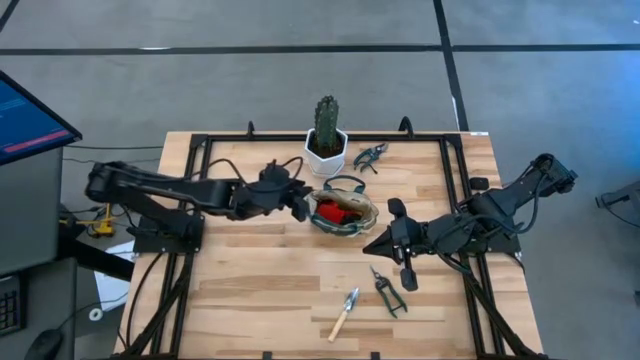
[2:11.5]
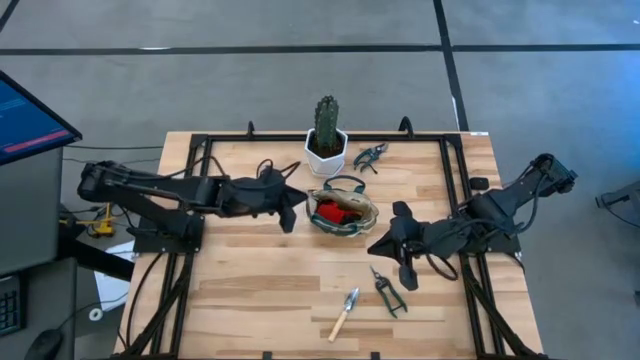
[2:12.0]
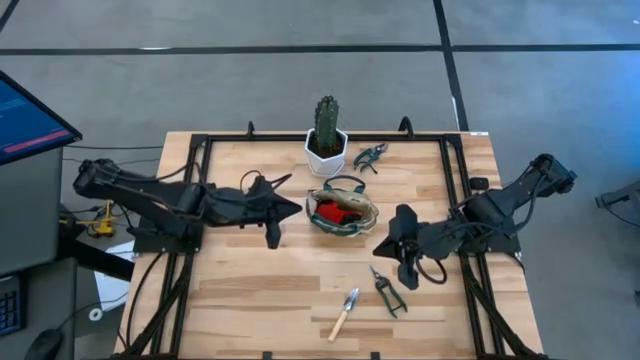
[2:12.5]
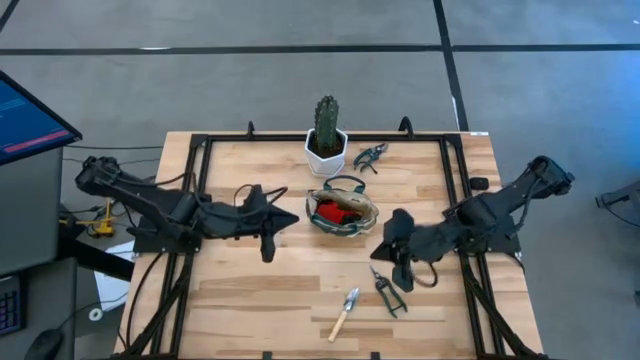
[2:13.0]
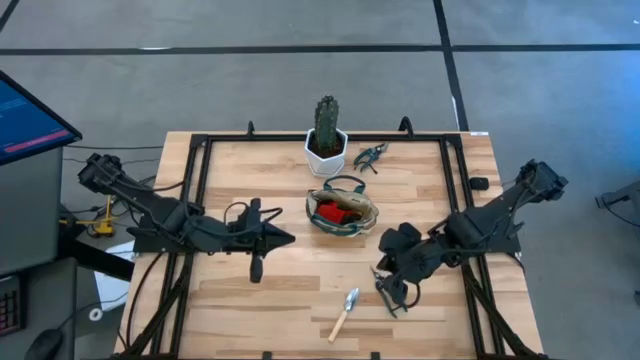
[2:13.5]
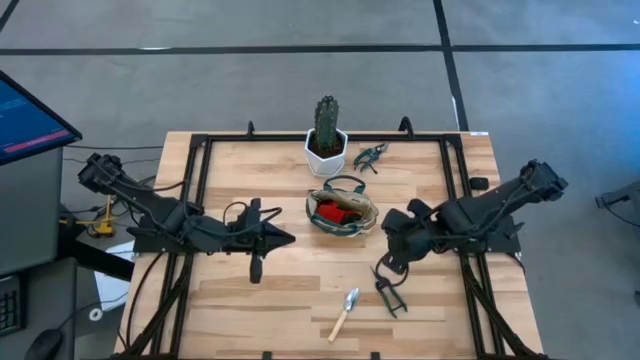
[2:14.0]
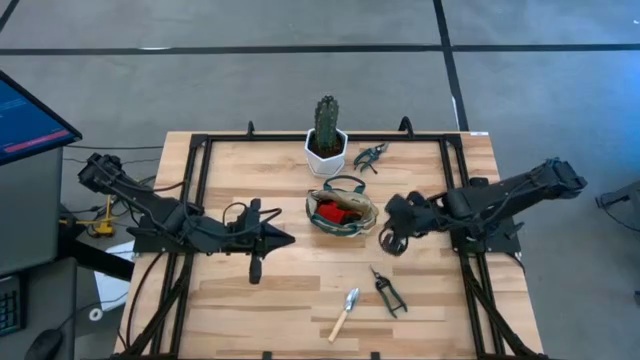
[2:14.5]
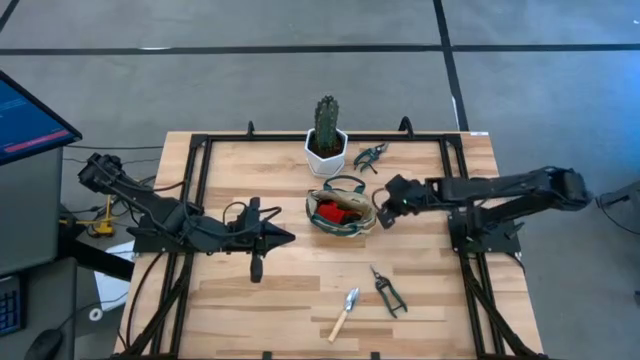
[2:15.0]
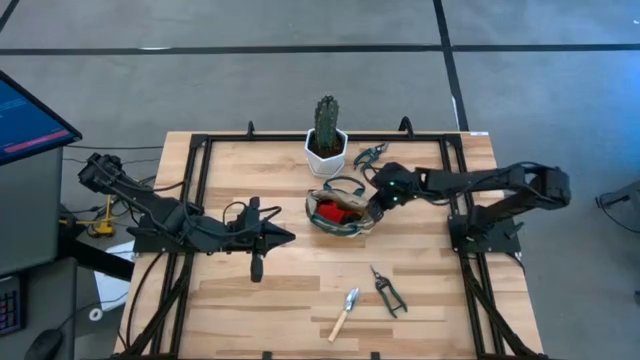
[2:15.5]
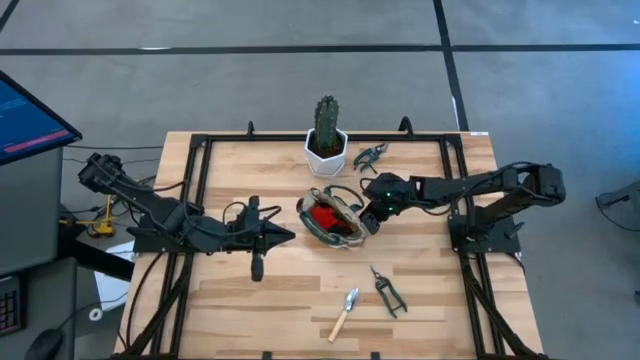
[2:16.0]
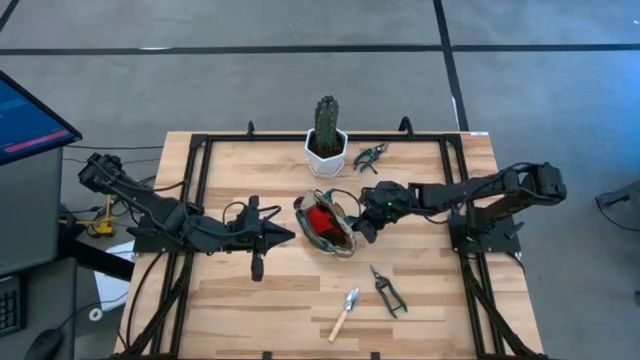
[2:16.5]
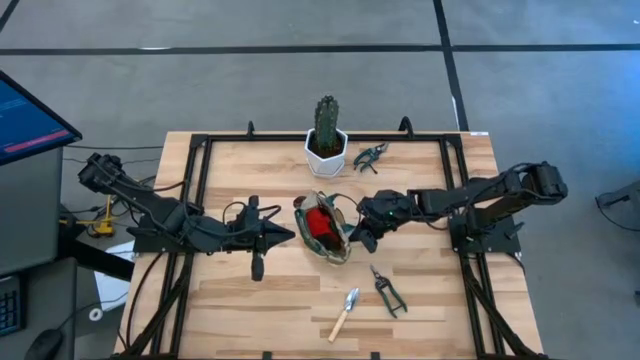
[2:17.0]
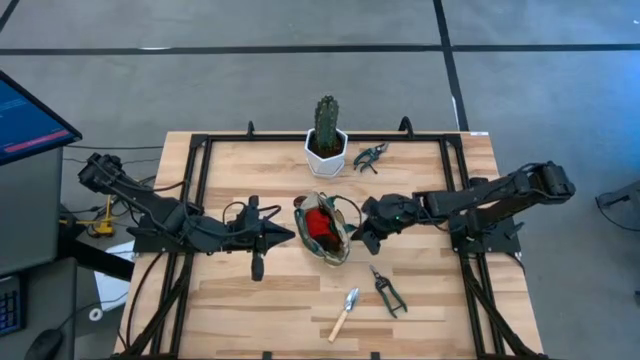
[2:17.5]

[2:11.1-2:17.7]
Task: Pick & Place Garden tools in Gardening bag
Adjust the gardening bag

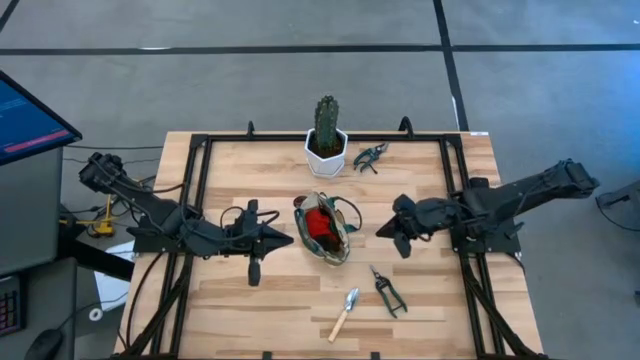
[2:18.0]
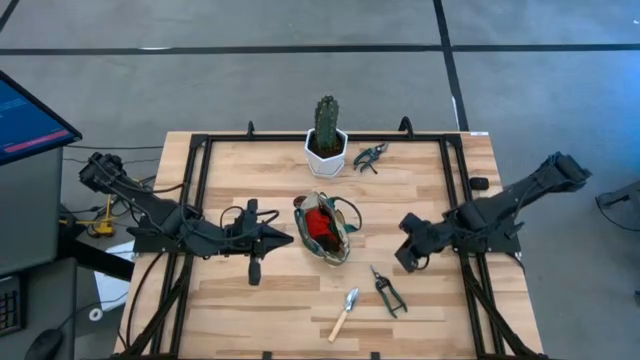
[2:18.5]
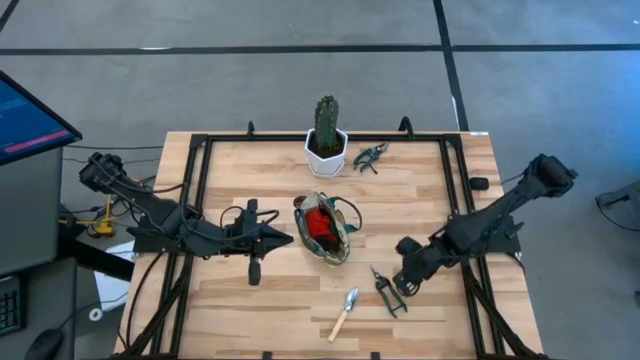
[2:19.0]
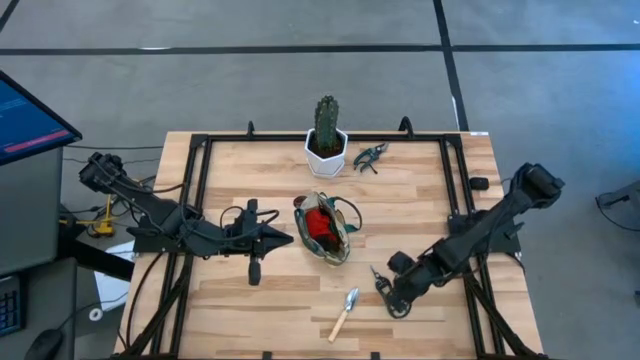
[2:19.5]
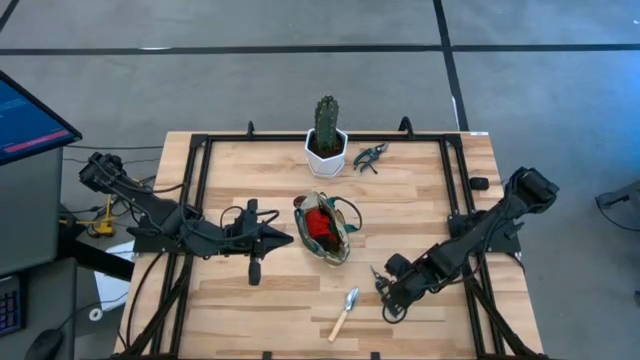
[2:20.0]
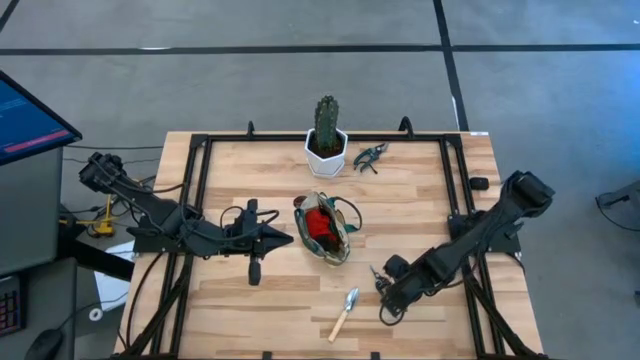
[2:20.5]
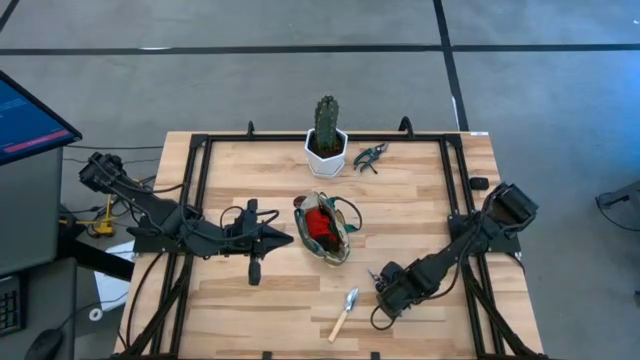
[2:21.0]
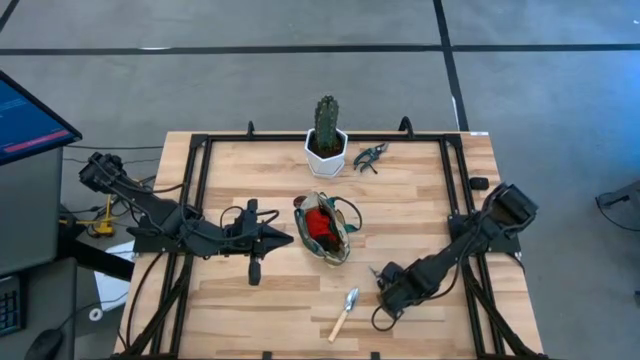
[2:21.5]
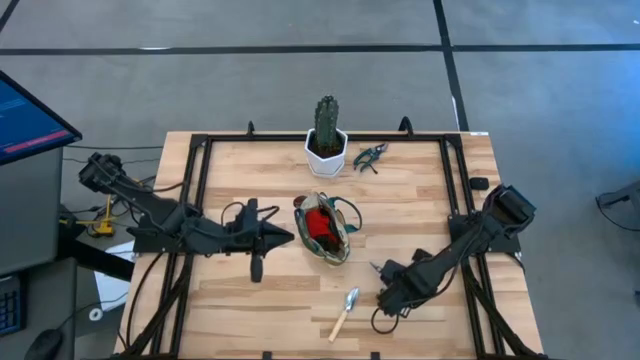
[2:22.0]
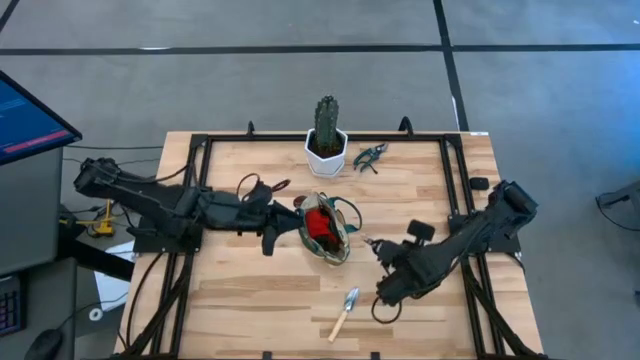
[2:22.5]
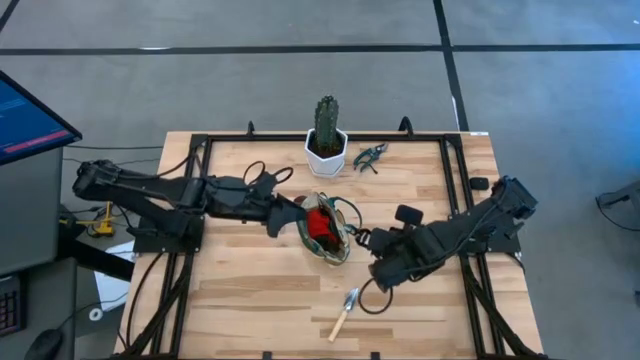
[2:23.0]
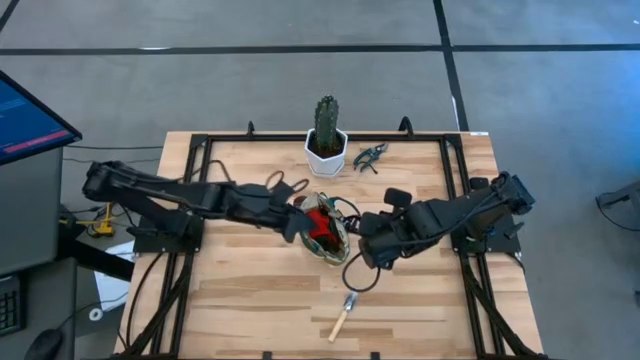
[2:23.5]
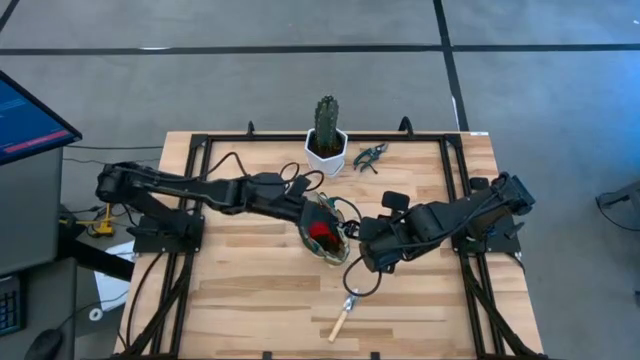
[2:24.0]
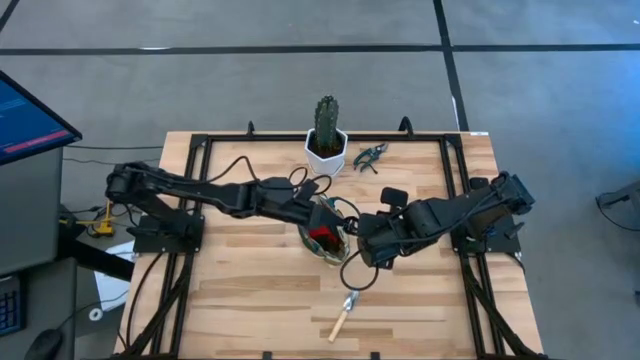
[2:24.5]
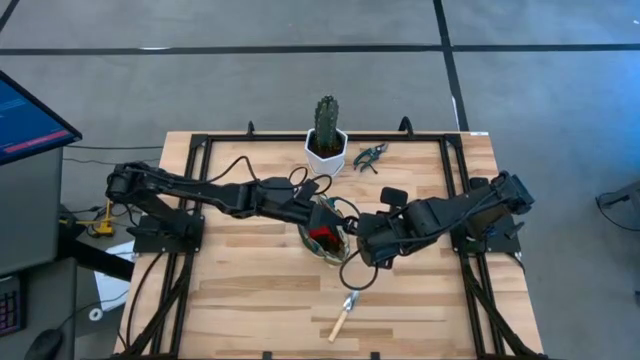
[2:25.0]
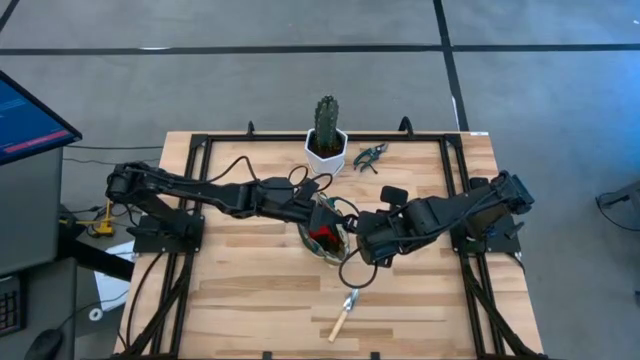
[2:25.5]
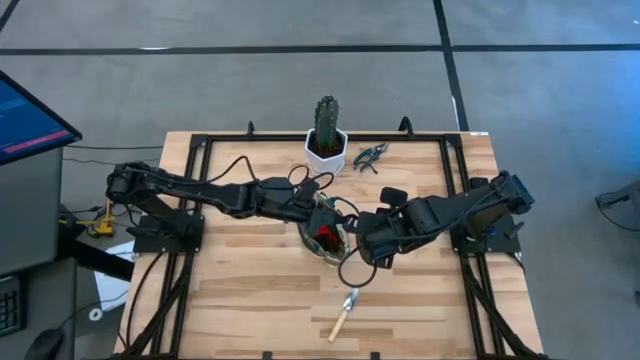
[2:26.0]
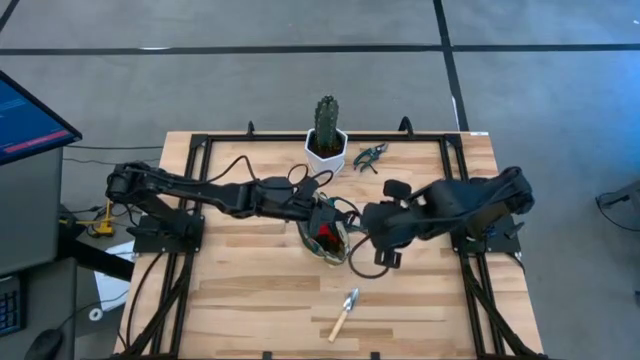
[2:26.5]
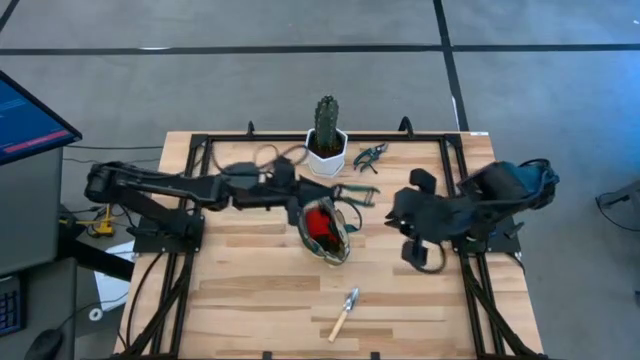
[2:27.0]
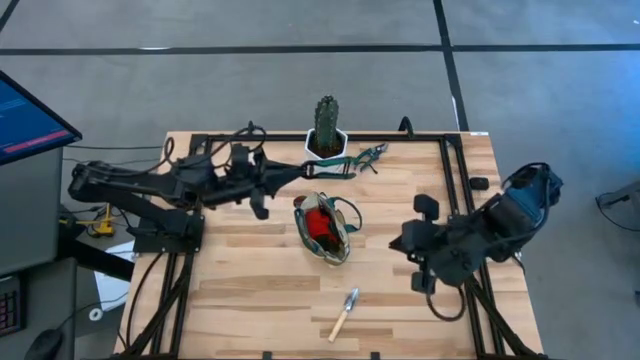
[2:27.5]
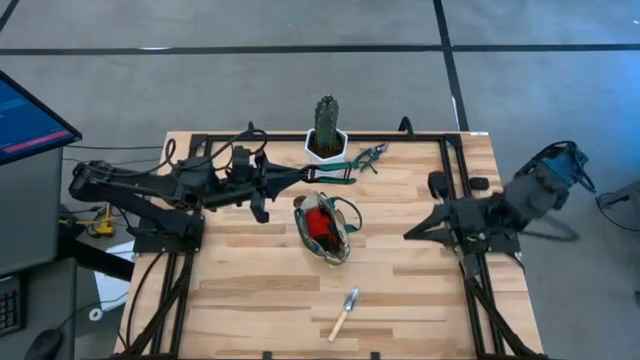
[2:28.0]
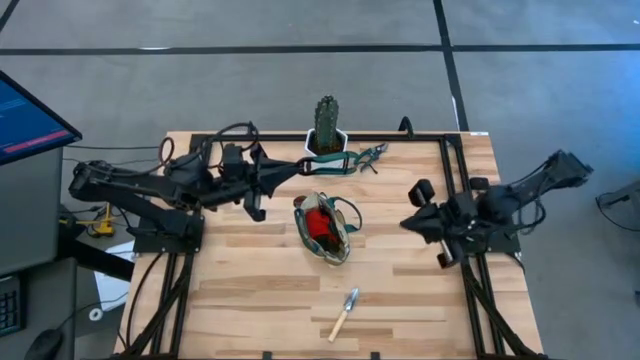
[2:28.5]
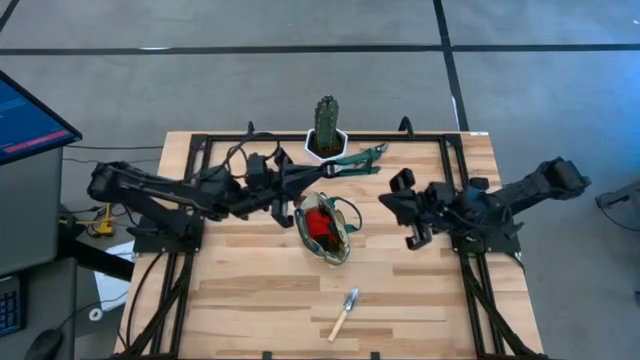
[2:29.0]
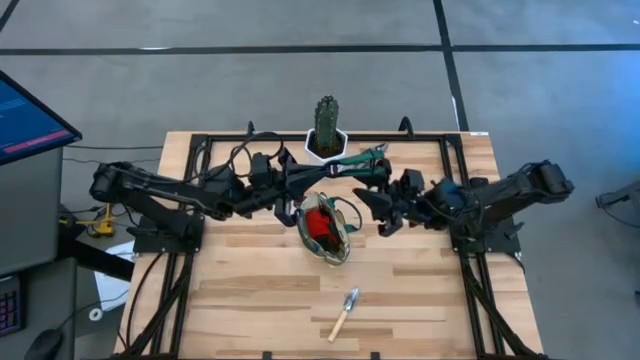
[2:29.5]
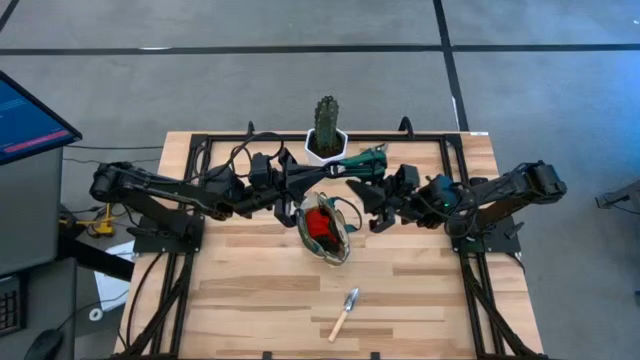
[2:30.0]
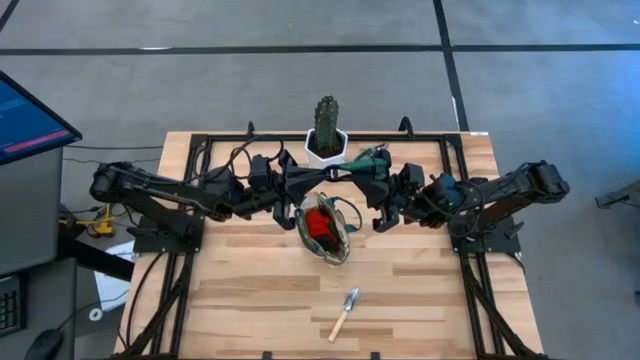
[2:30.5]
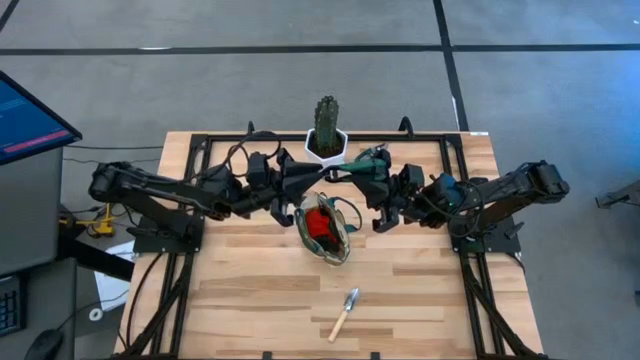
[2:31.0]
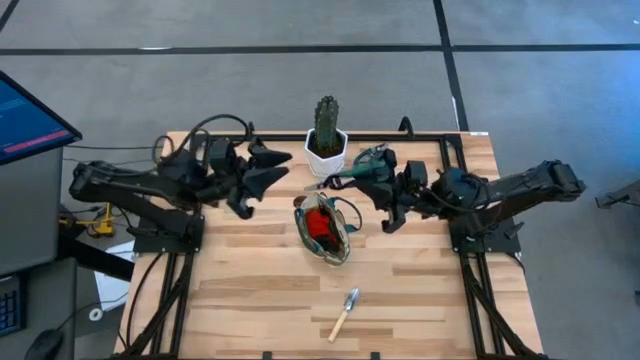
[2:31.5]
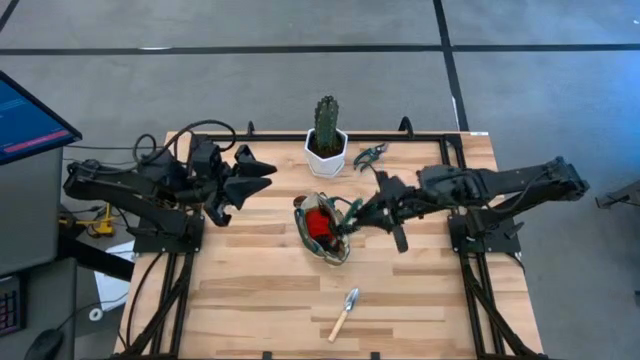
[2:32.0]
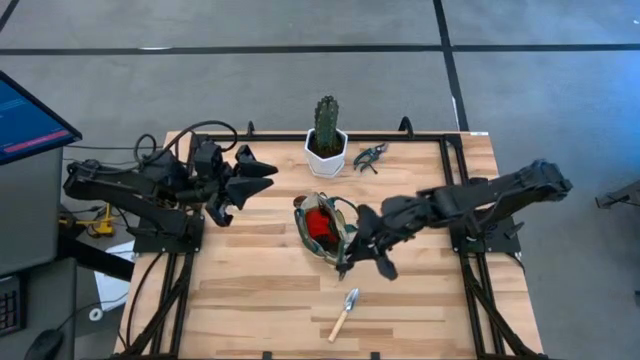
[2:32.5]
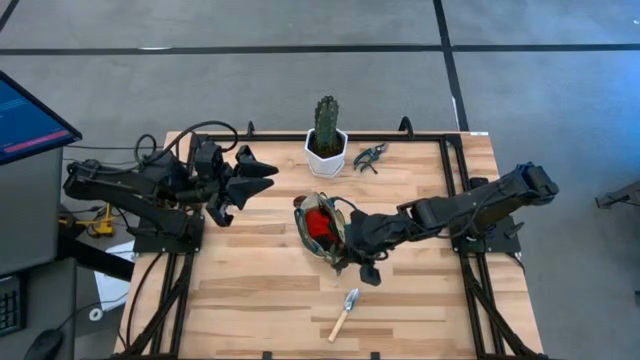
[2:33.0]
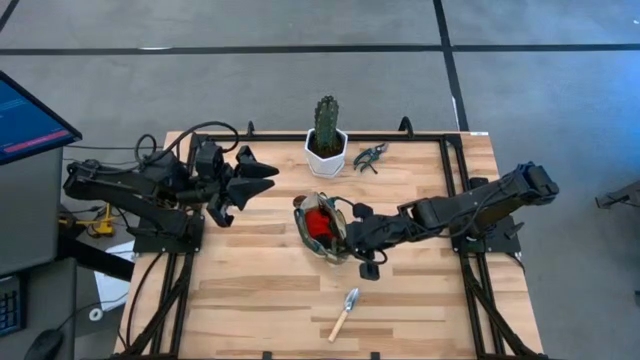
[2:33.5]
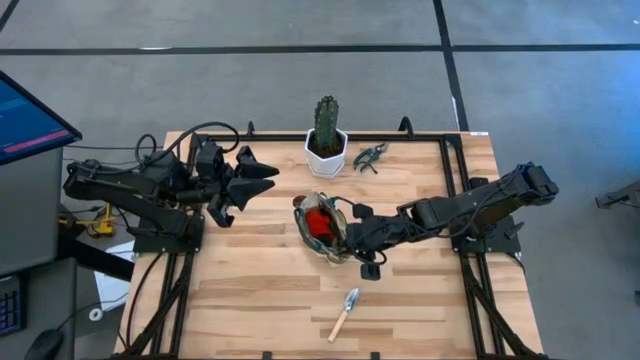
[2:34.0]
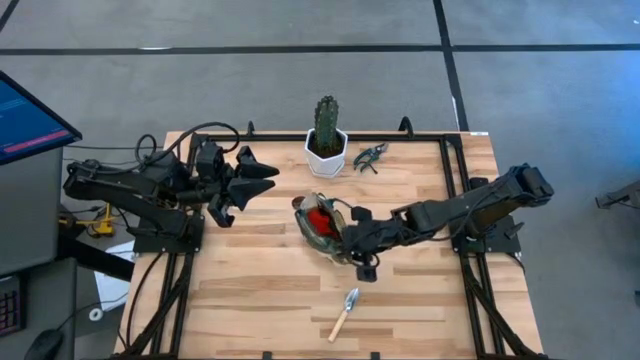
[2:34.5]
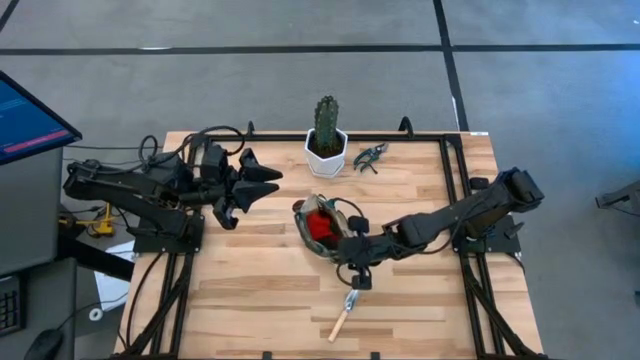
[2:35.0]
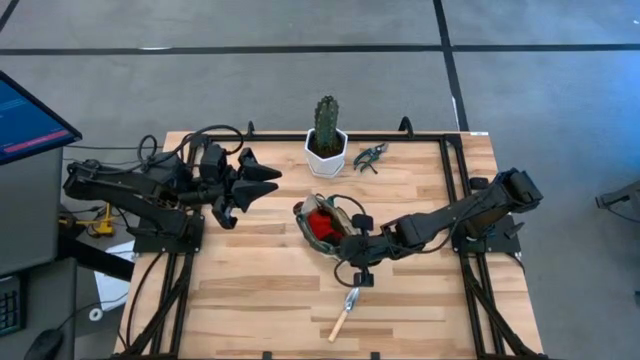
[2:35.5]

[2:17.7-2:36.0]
Put the bottom green shear scissors into the gardening bag
